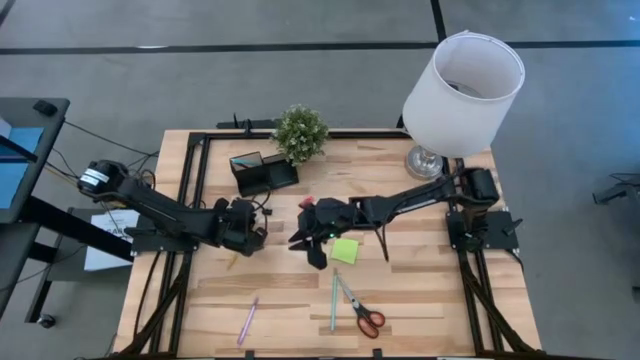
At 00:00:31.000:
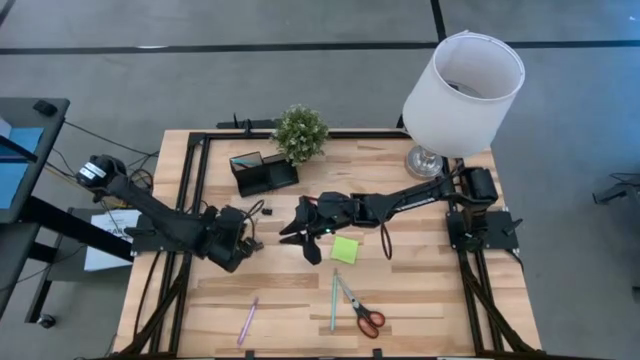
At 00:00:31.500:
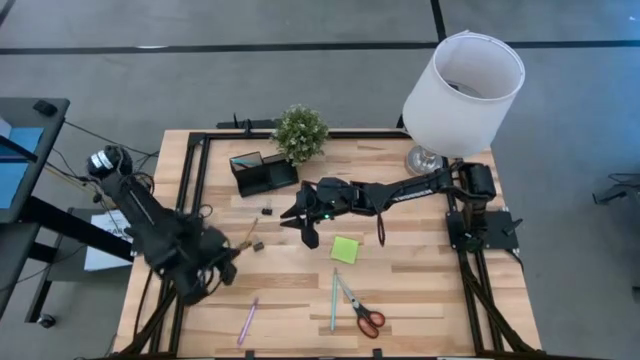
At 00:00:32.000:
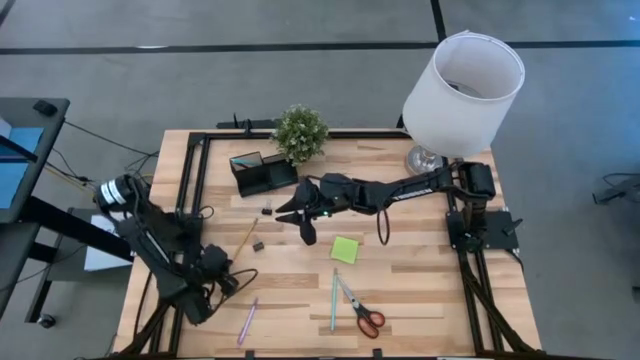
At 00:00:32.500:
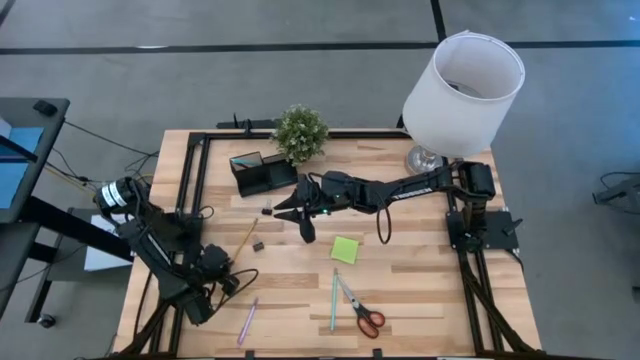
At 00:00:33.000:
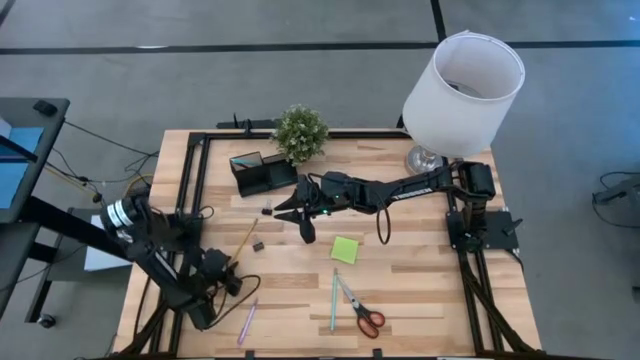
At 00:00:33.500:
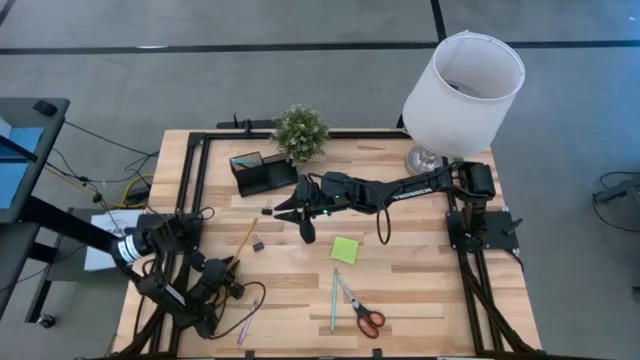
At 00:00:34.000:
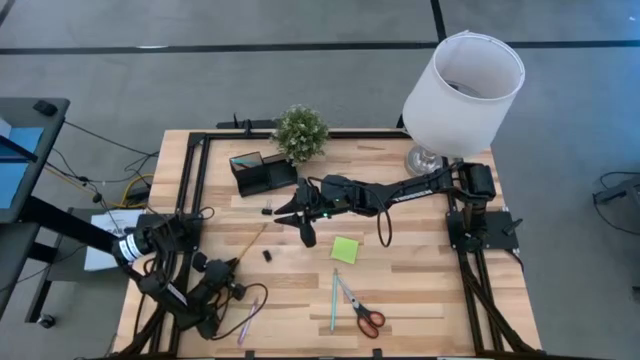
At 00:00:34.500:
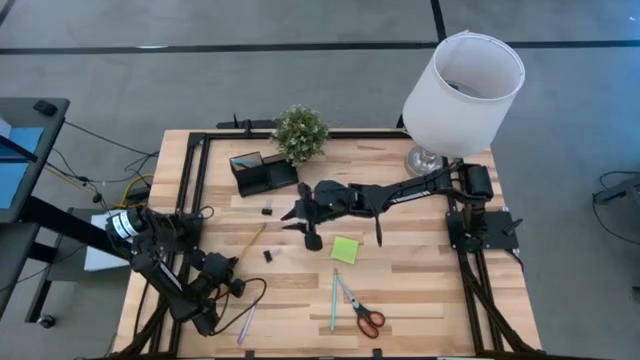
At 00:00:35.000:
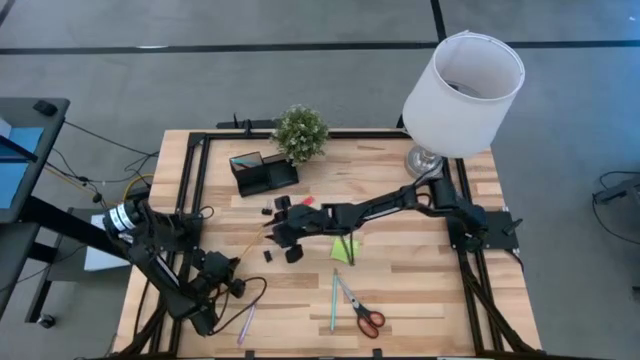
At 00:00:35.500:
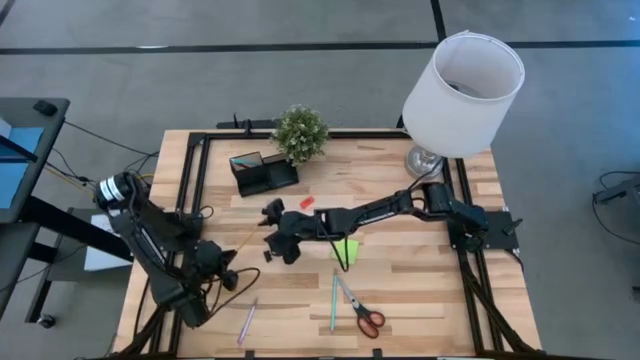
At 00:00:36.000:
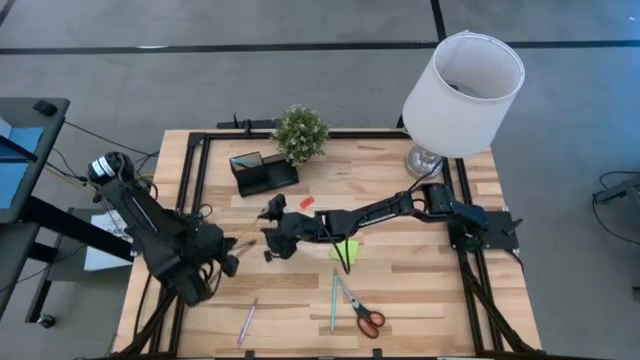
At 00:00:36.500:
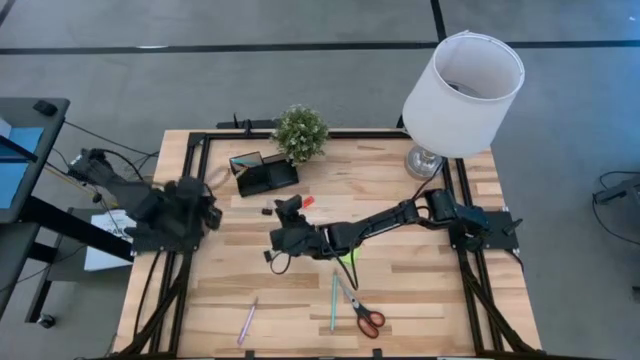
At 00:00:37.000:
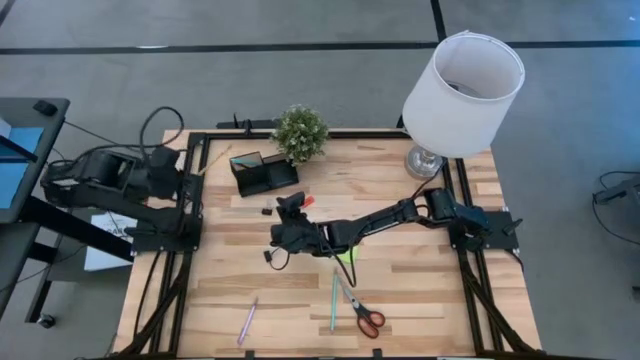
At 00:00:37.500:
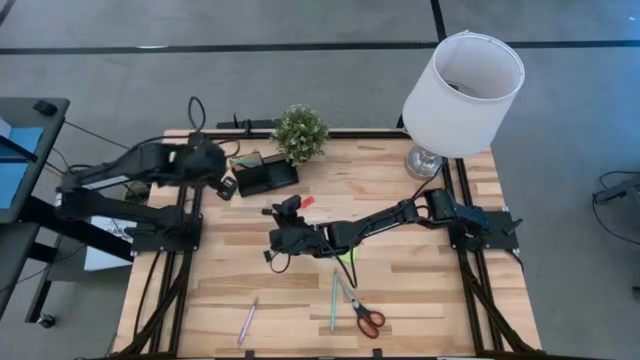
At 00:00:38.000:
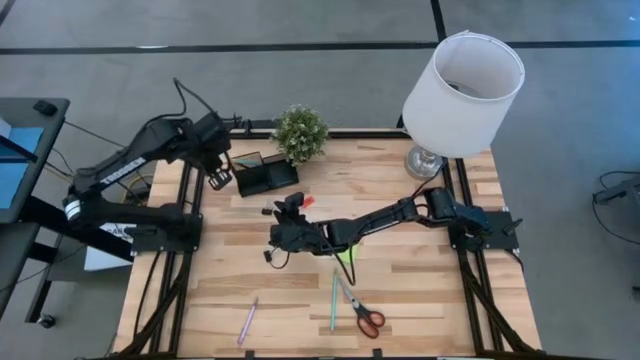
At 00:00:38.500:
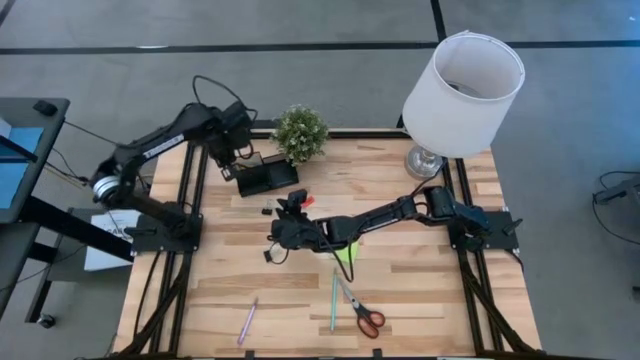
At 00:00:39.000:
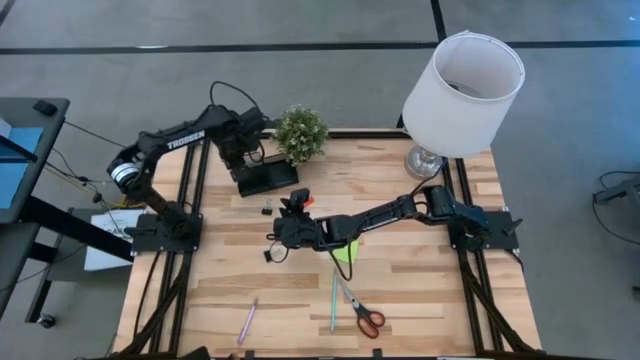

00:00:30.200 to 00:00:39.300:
Task: Pick and place office supplies into organizer
Put the yellow pencil into the black organizer

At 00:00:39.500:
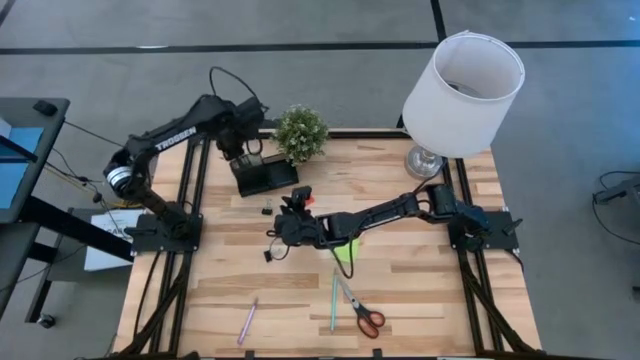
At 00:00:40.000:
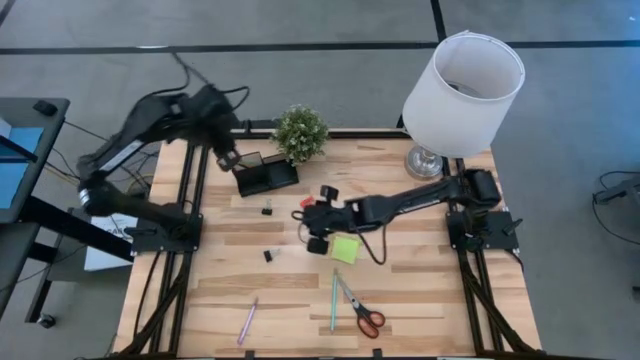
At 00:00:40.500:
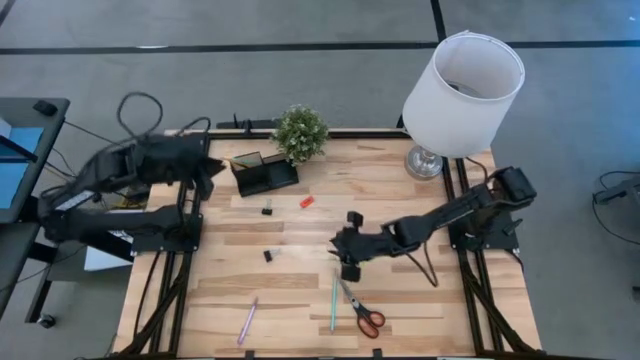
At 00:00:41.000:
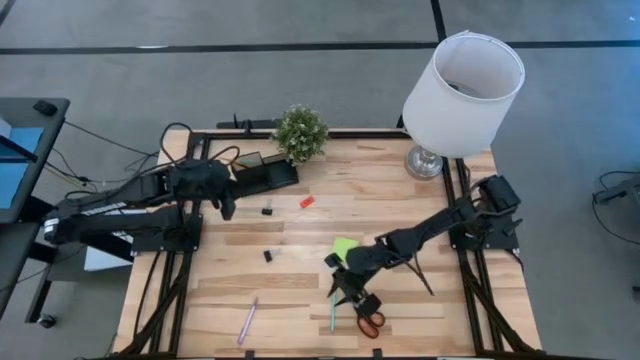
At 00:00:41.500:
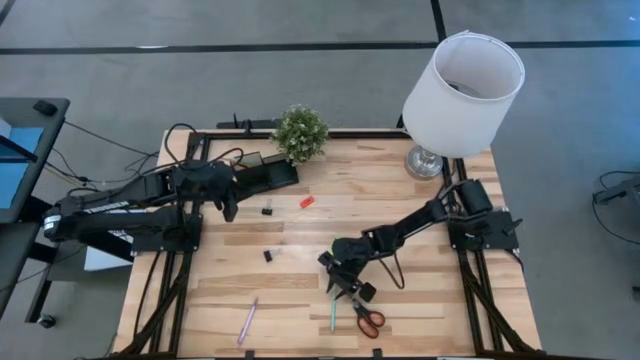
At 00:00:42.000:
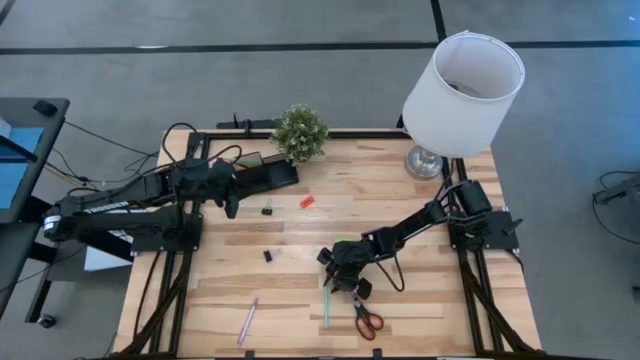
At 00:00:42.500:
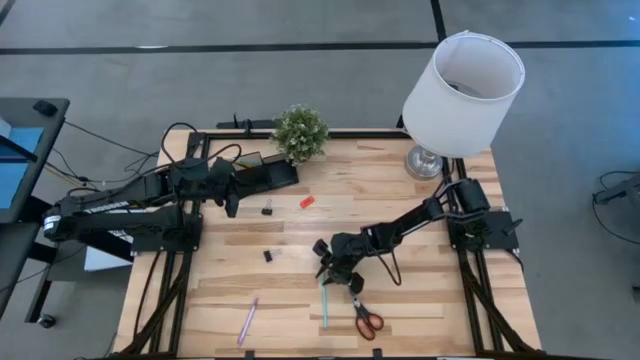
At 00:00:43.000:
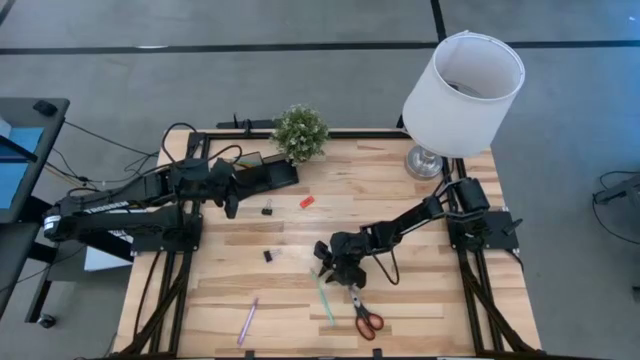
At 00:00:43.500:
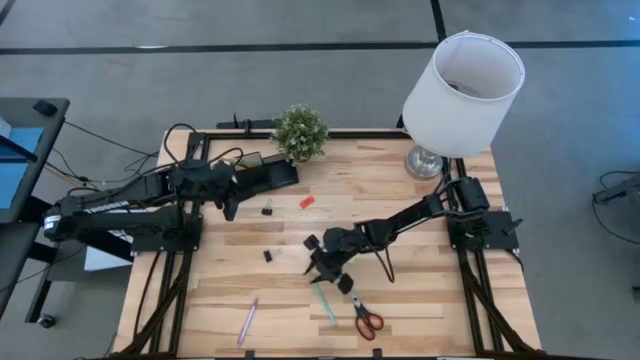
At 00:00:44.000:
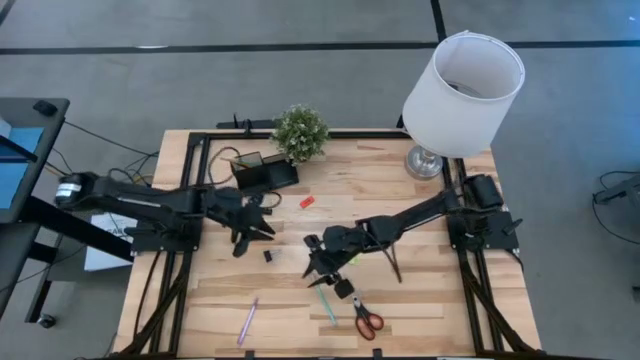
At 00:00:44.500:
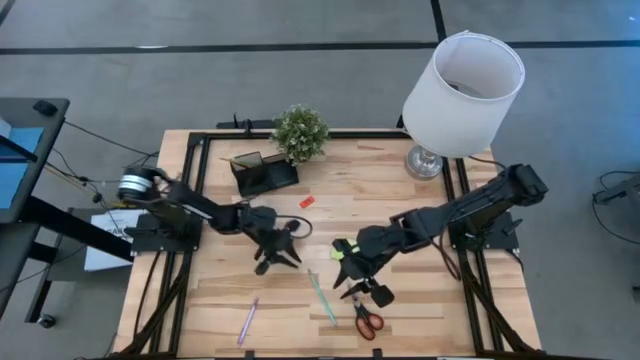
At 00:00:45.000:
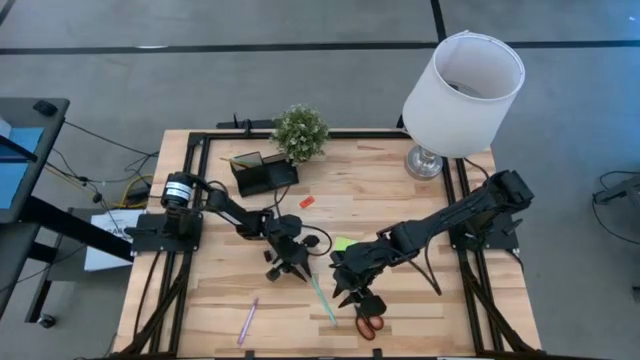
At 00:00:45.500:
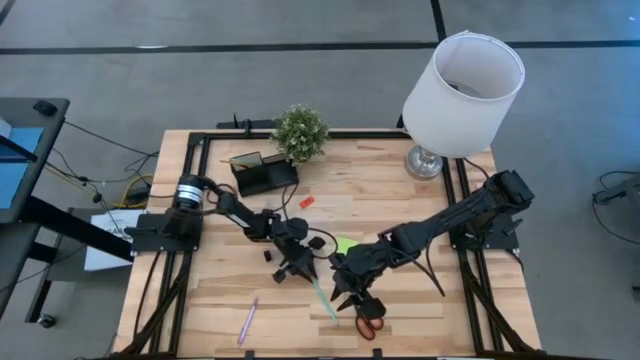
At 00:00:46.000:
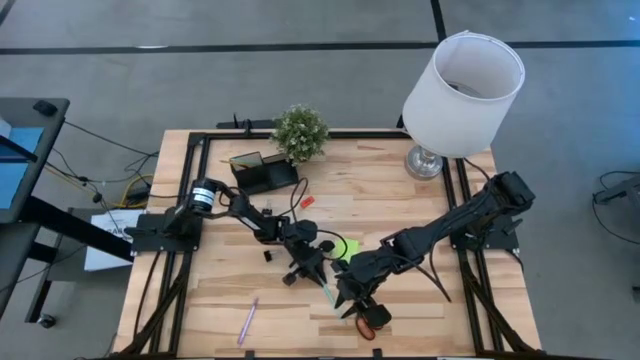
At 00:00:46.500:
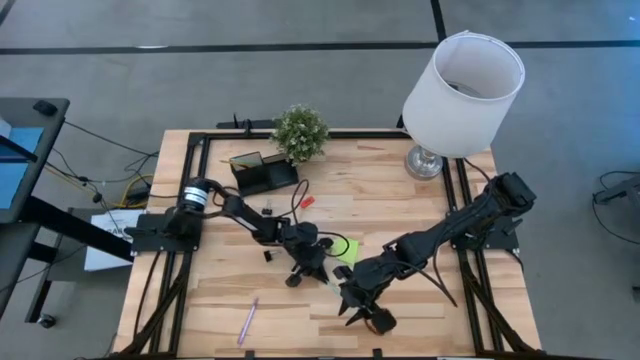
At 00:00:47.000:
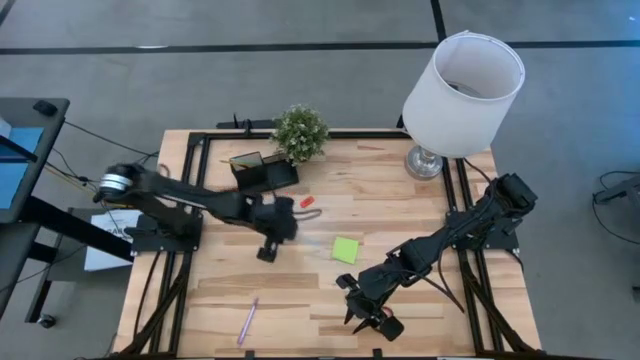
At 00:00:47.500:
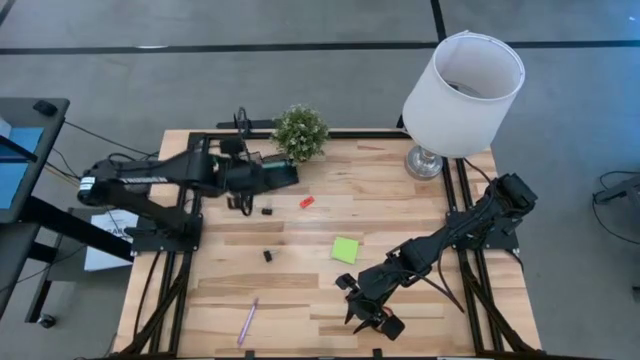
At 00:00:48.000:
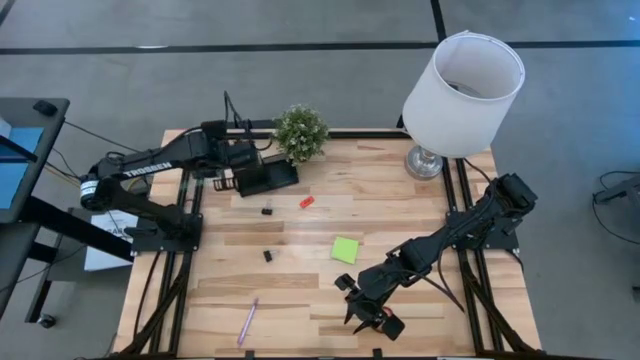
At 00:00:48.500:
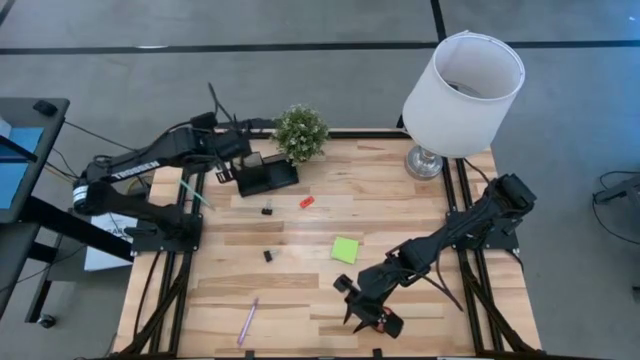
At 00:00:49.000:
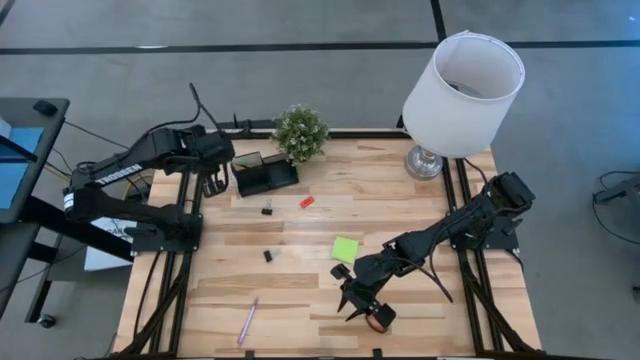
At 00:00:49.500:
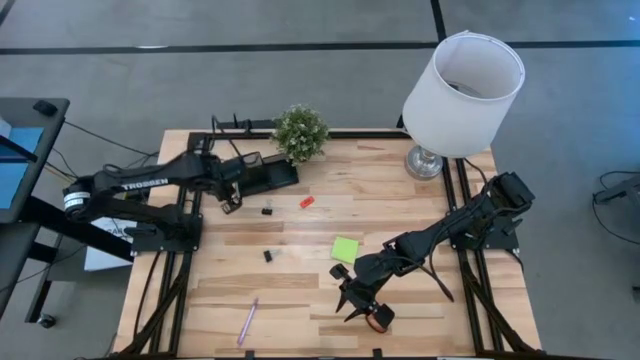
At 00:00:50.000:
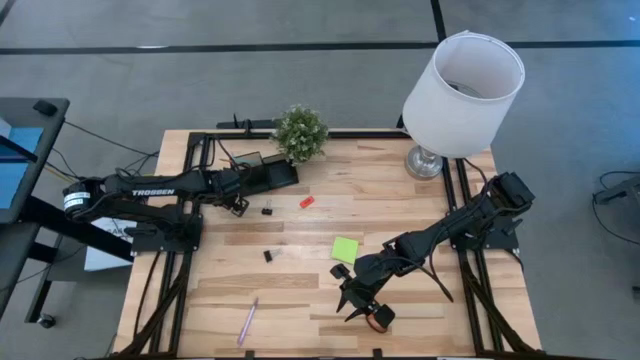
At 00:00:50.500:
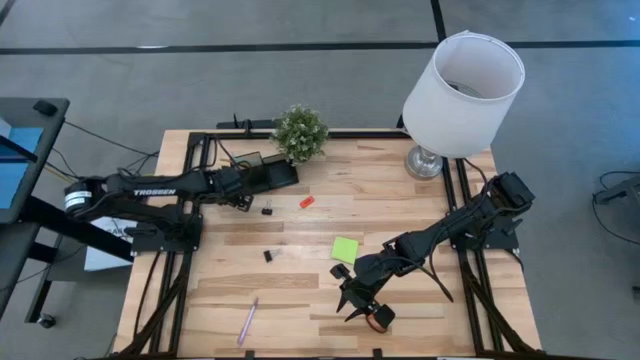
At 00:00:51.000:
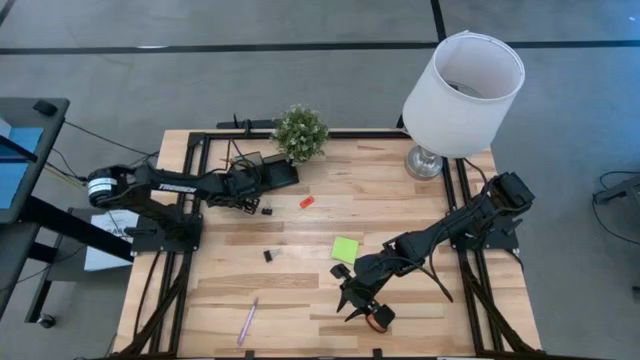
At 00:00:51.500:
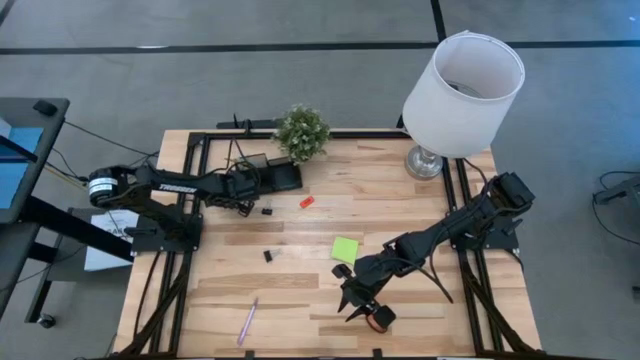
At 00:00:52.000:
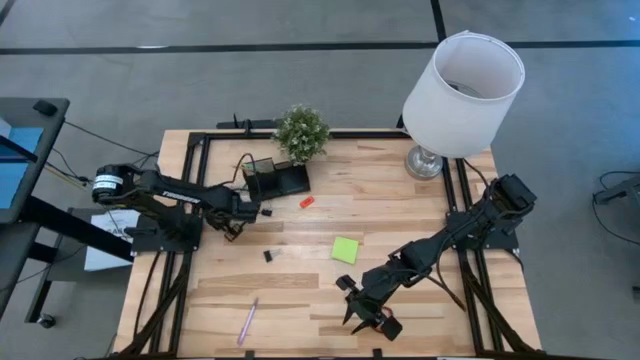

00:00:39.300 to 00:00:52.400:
Put the sky blue pencil into the black organizer
